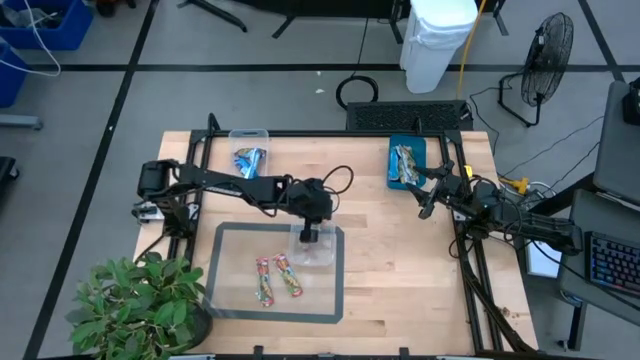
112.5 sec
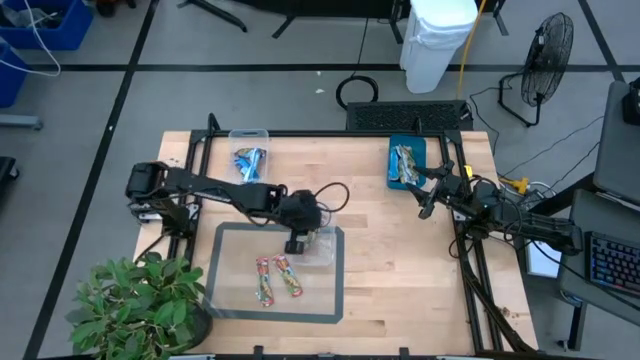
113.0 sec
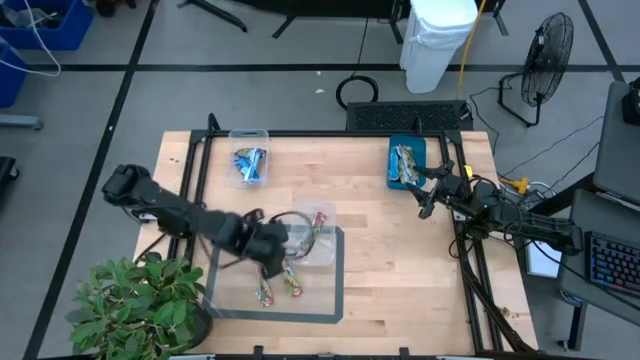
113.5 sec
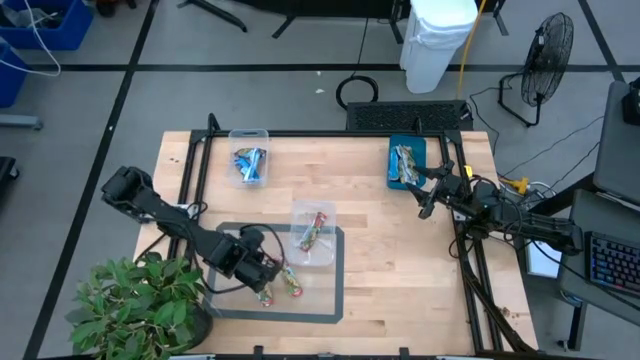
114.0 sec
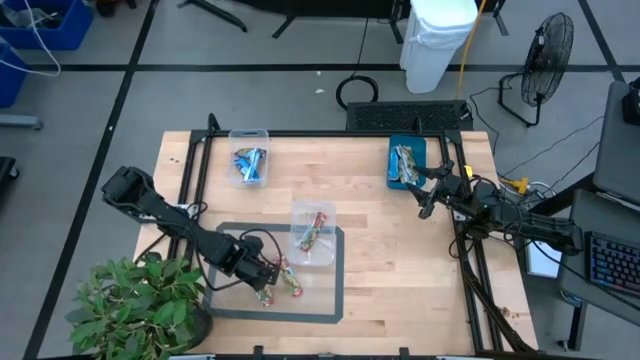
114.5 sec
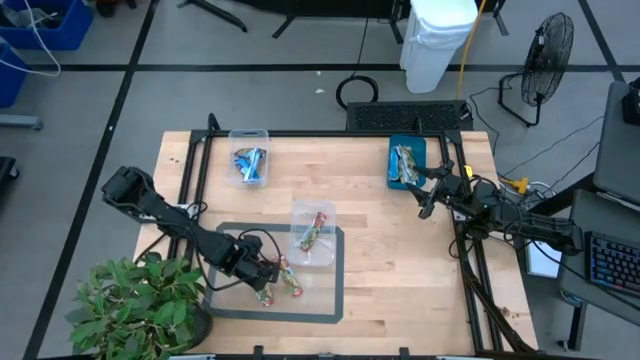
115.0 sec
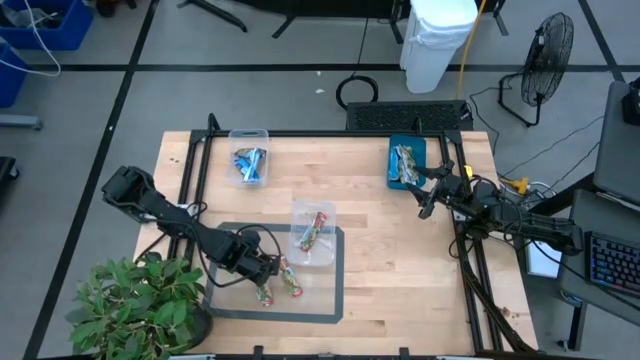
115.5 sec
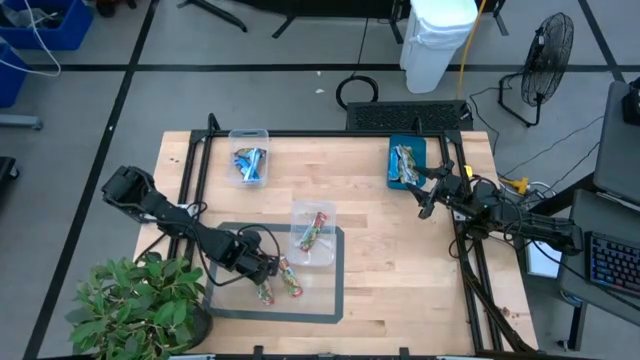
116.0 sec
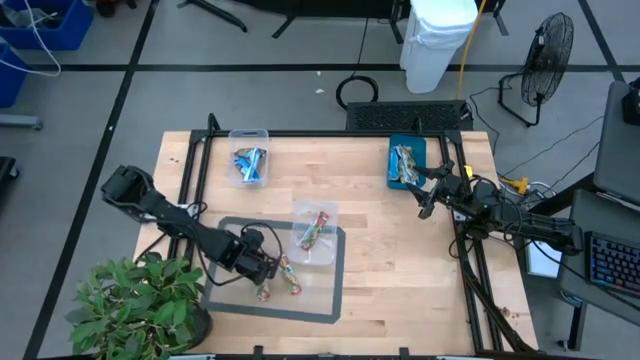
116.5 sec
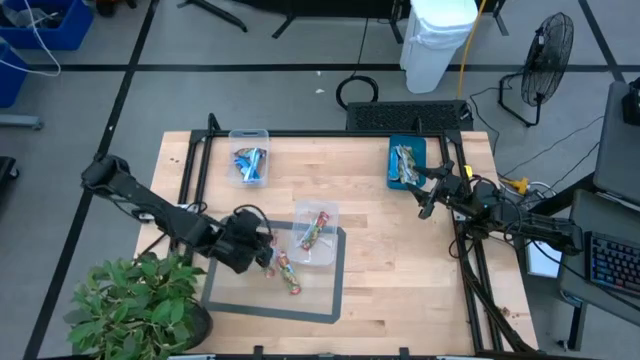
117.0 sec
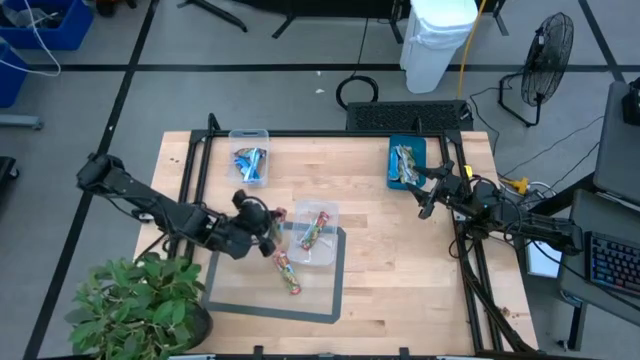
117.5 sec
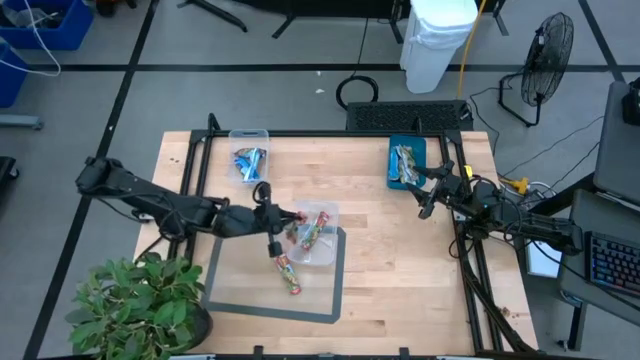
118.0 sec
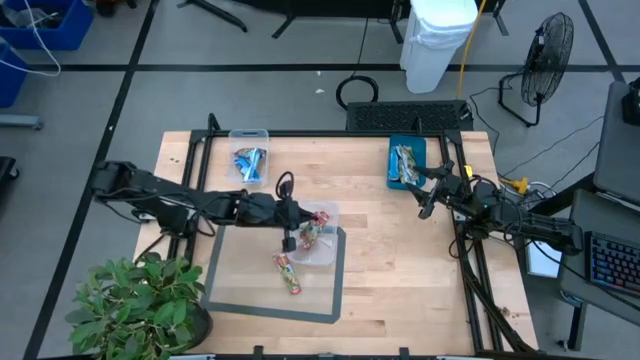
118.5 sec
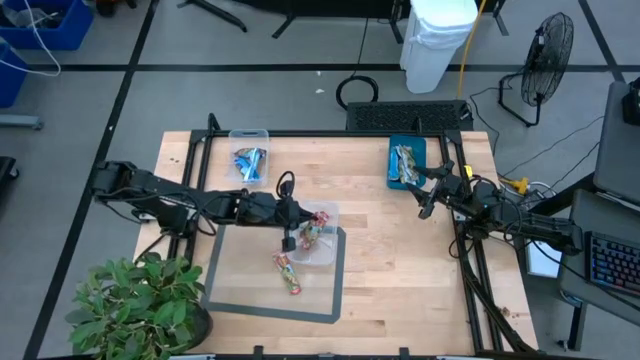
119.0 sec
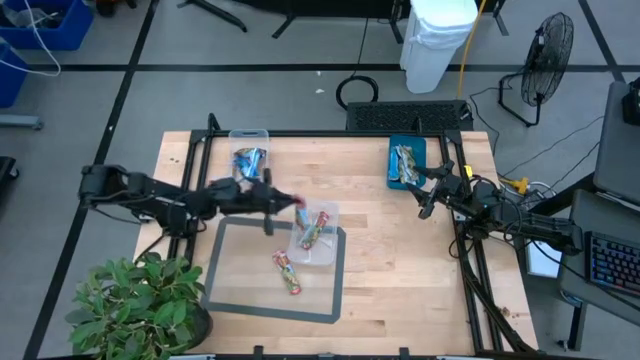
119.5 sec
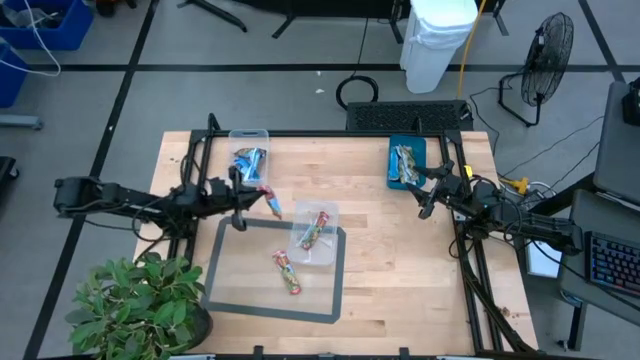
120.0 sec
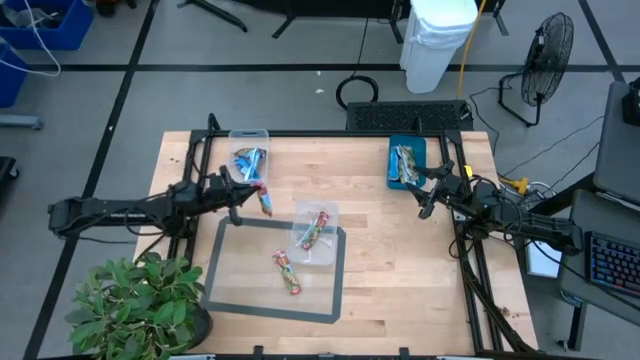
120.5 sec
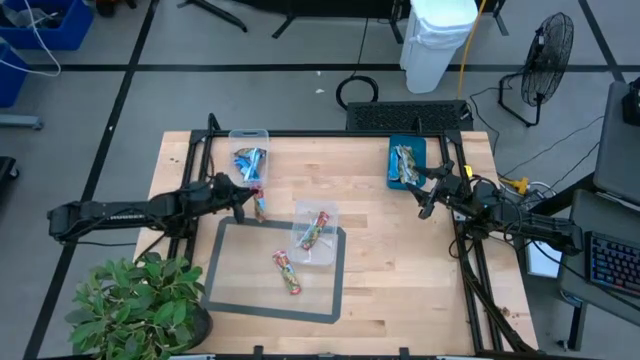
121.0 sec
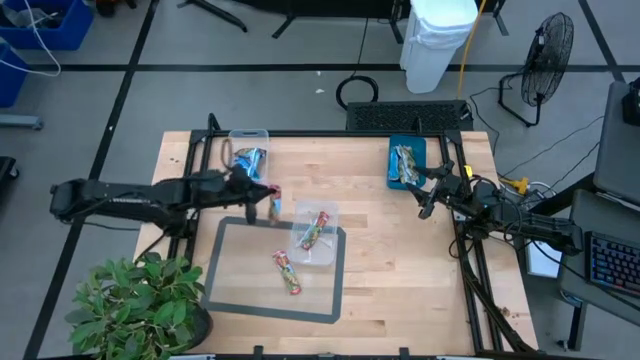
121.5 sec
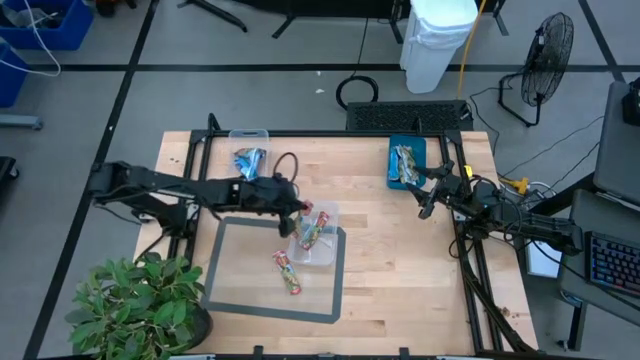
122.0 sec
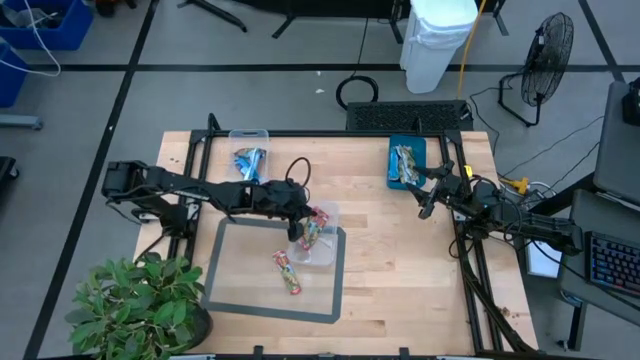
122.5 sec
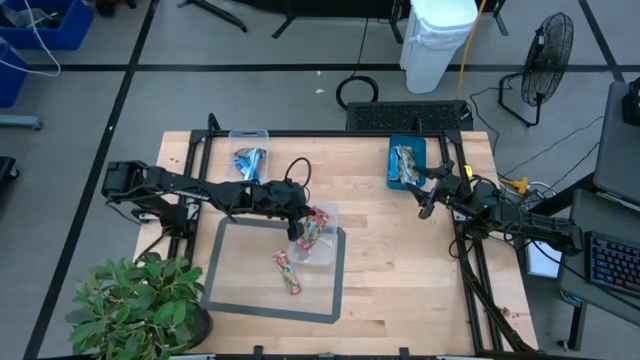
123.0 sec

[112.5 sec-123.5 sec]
Task: Pick and place Granola Bars by type
Put the red granola bar into the bottom transparent bin

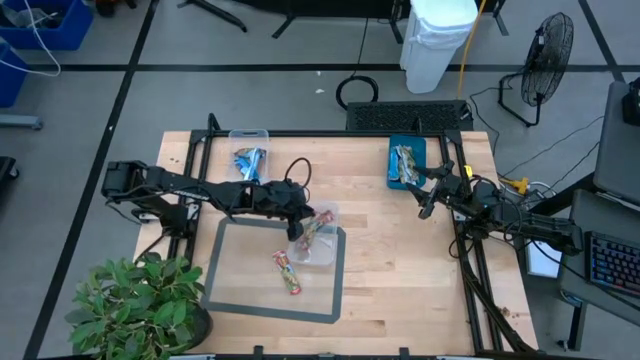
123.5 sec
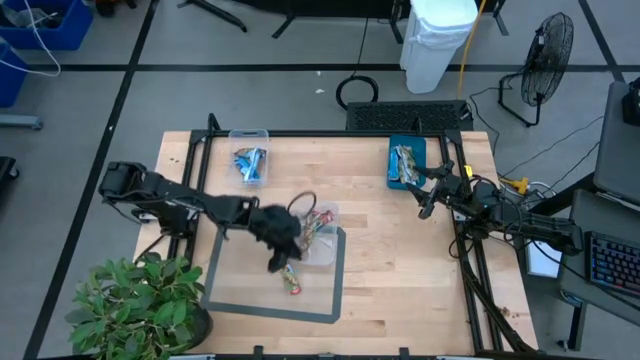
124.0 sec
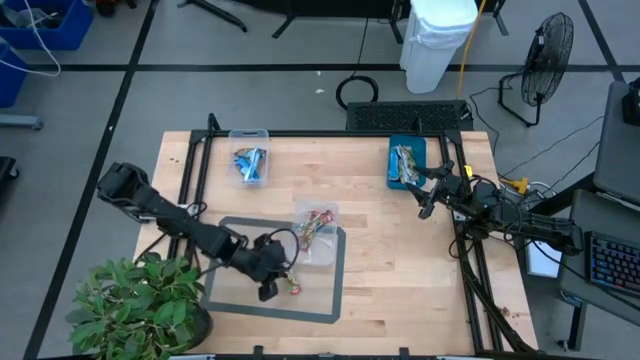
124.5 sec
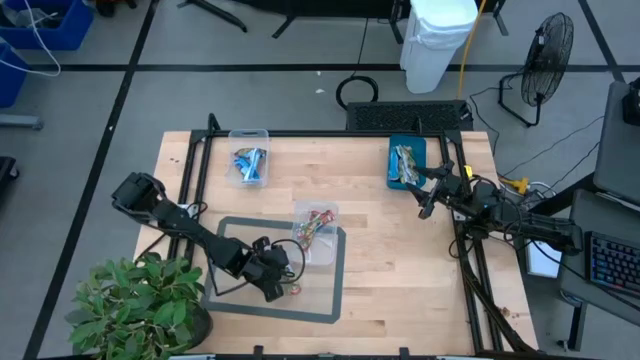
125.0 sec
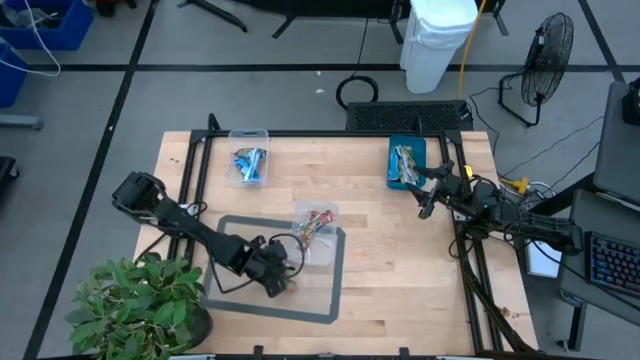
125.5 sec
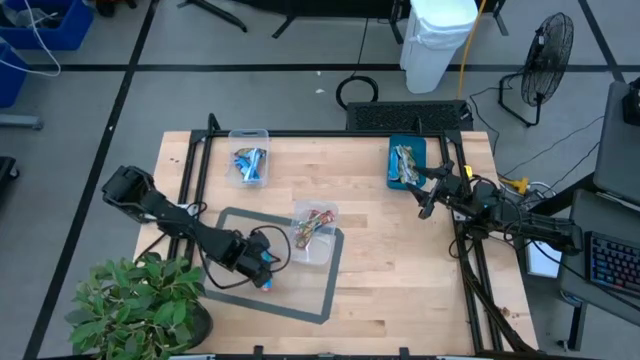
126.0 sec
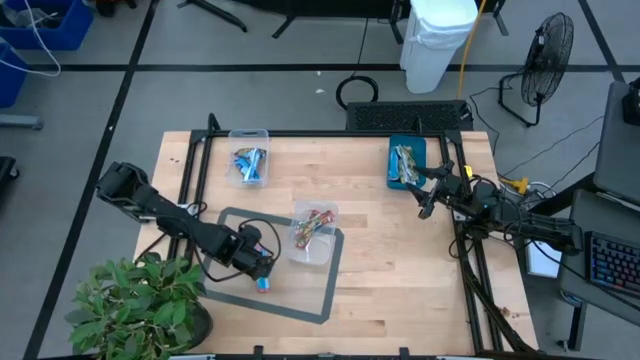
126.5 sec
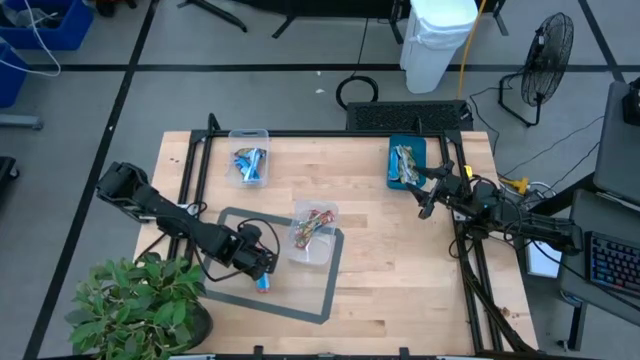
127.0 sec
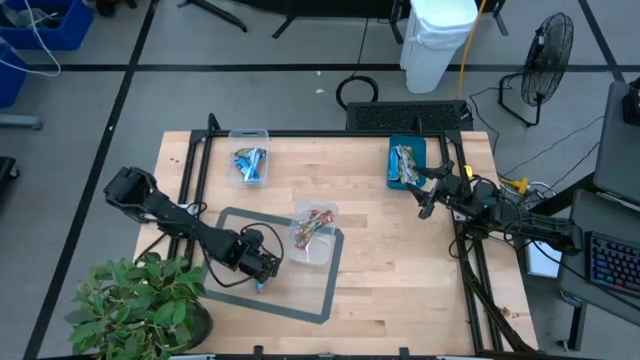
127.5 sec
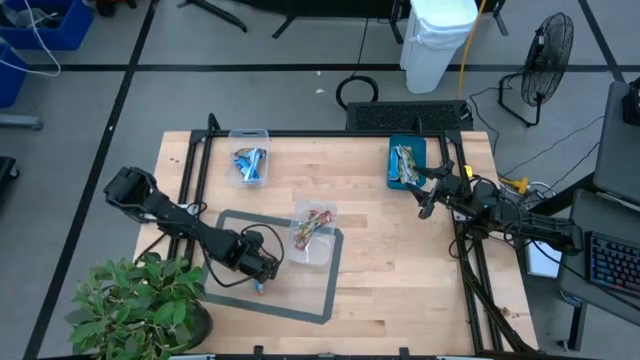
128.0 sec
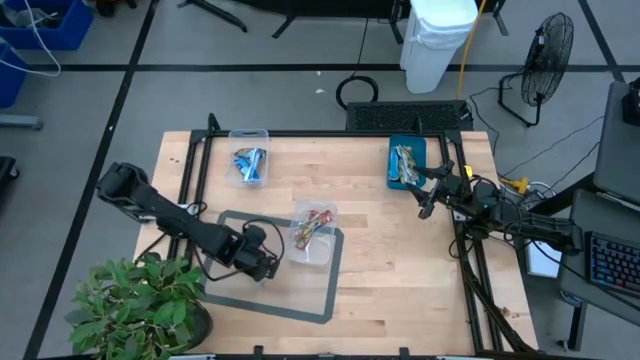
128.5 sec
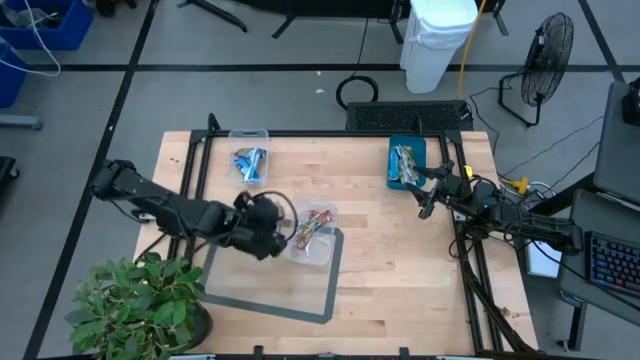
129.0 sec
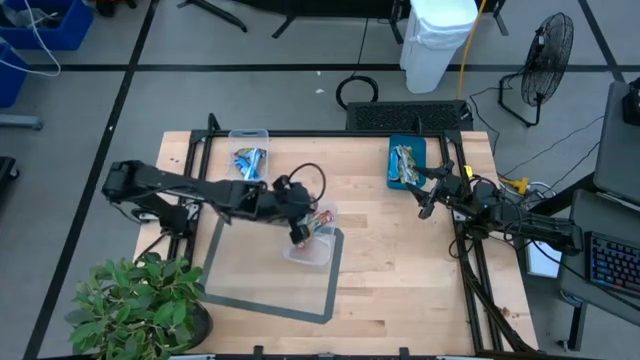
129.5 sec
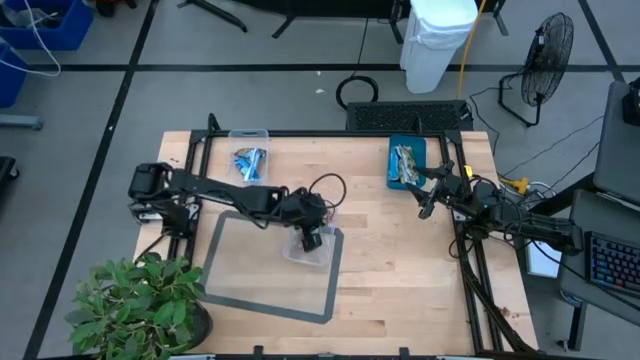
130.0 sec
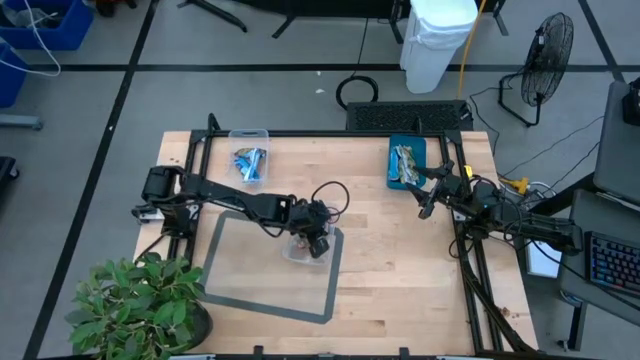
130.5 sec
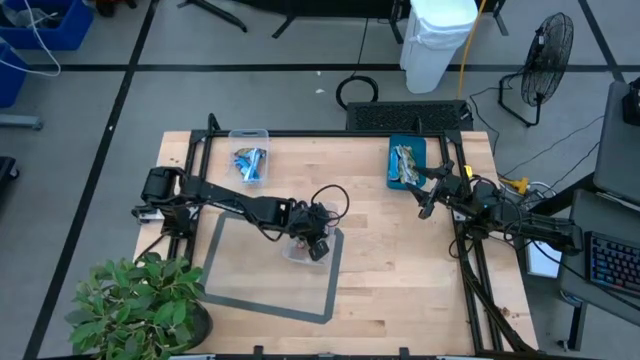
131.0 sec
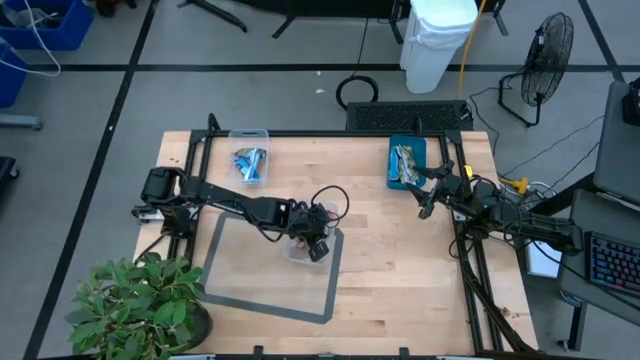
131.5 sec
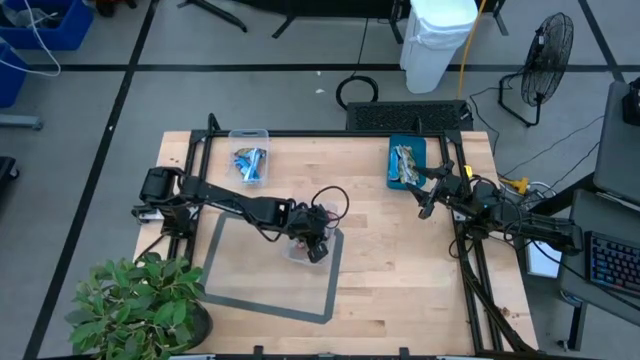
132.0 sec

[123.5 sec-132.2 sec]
Put the red granola bar into the bottom transparent bin
